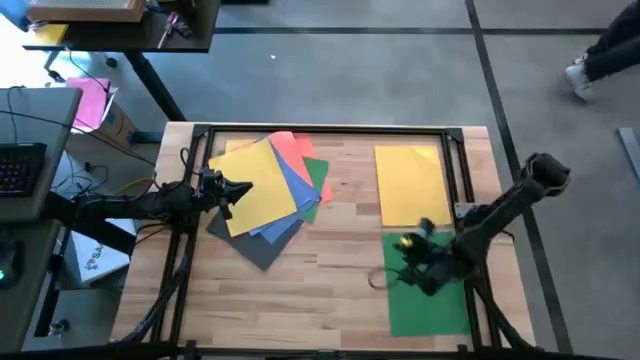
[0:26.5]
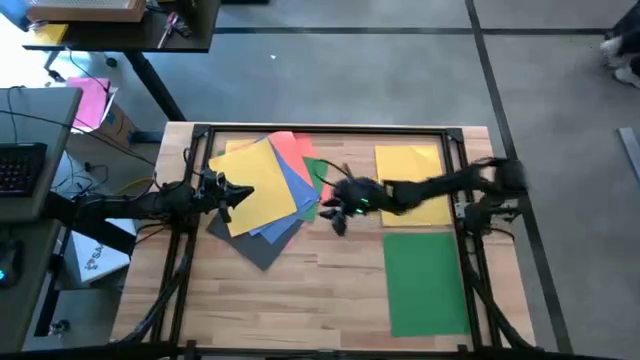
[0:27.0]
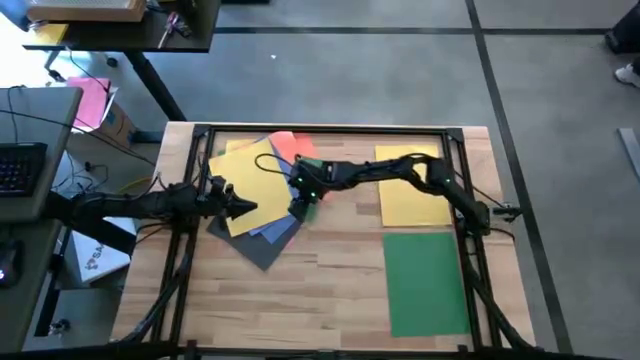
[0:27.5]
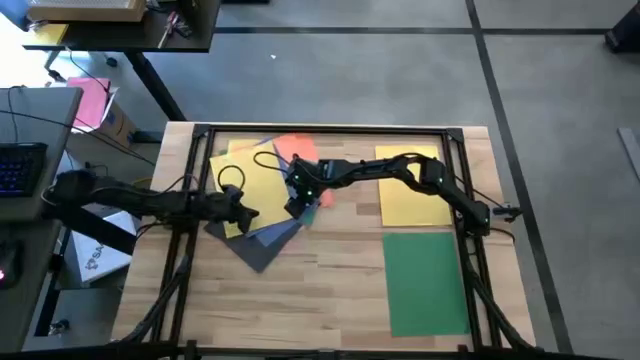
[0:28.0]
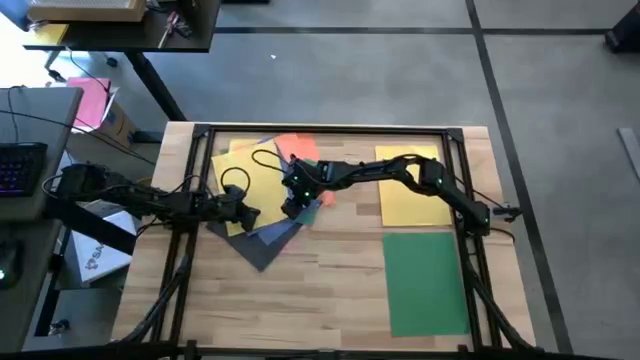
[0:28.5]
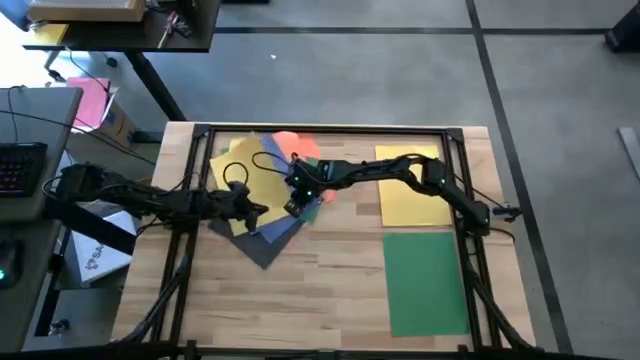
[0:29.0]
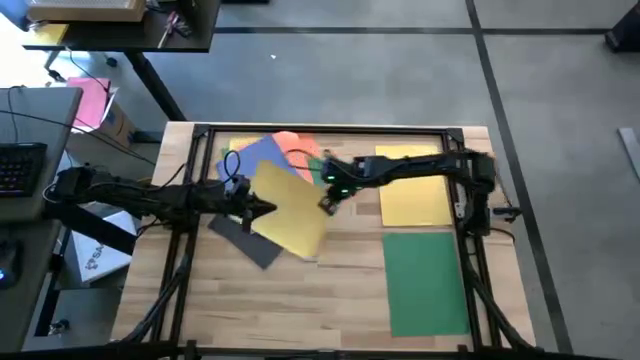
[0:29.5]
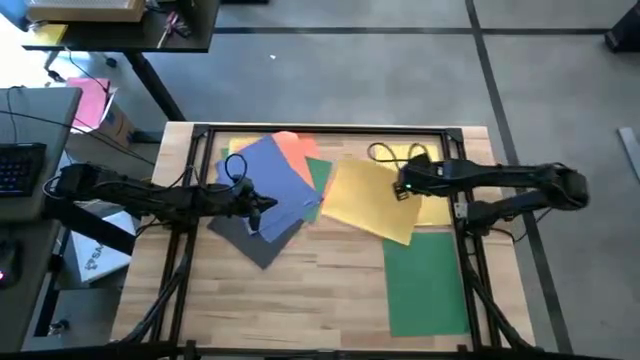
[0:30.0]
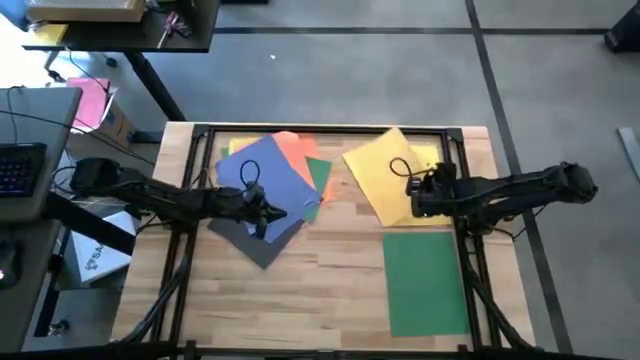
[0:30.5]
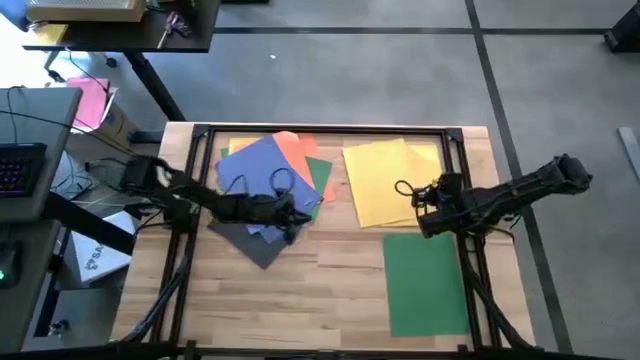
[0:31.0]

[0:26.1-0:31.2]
Task: Organize paper
Stack the yellow paper on top of the yellow paper

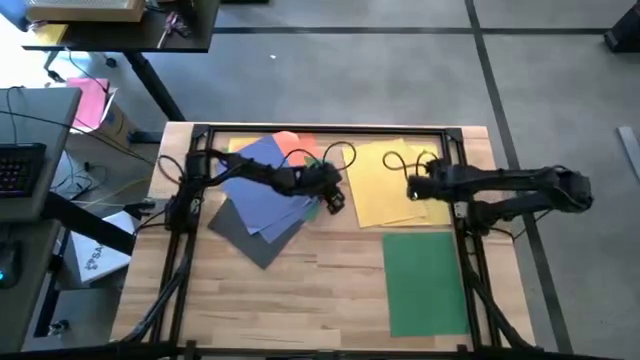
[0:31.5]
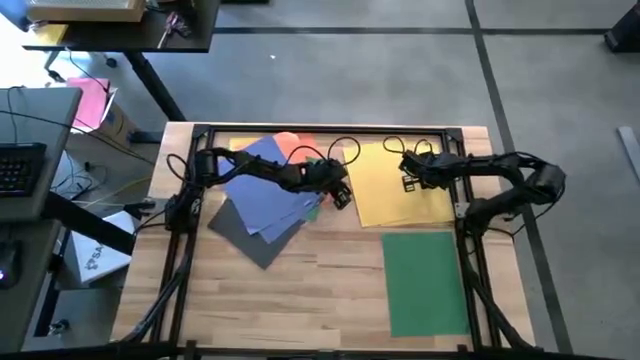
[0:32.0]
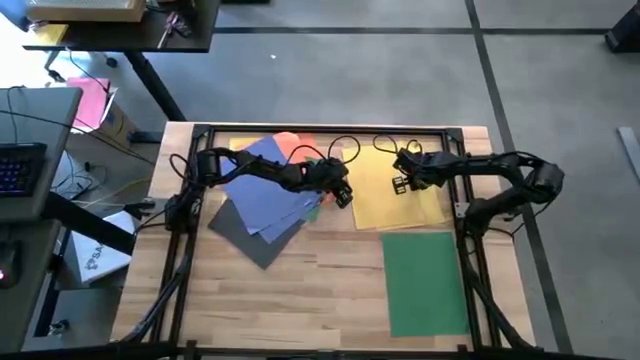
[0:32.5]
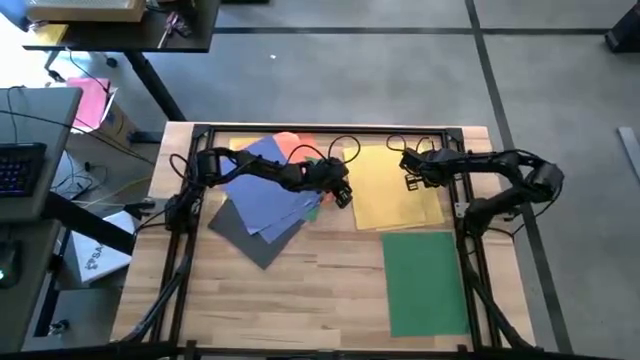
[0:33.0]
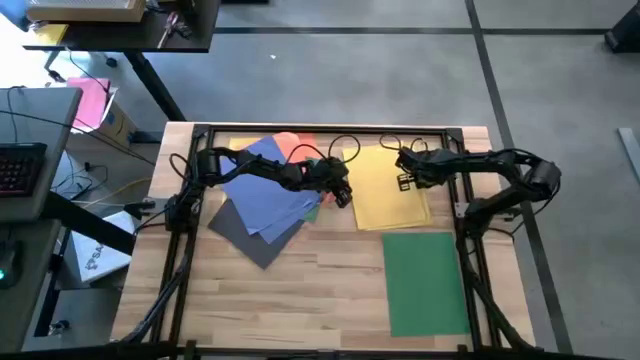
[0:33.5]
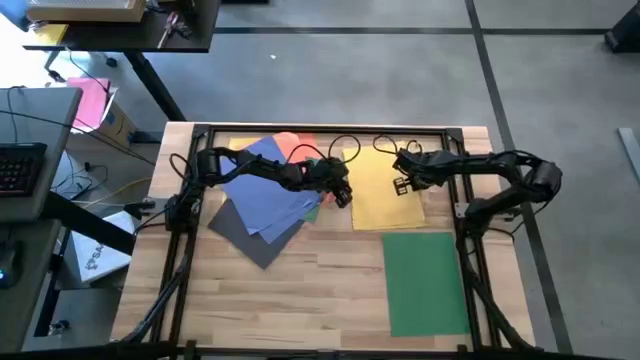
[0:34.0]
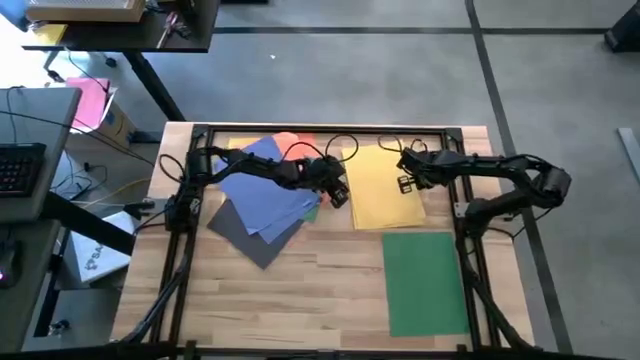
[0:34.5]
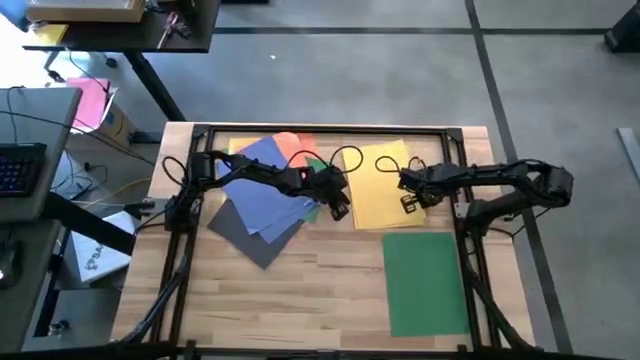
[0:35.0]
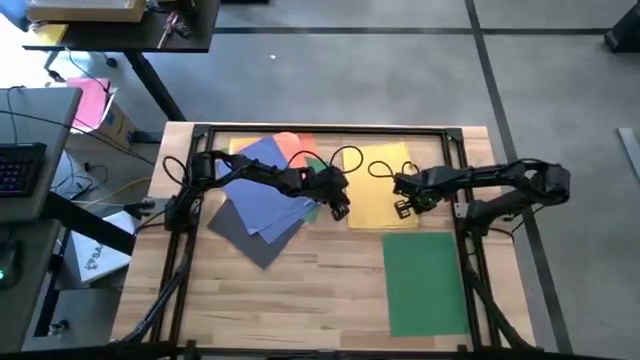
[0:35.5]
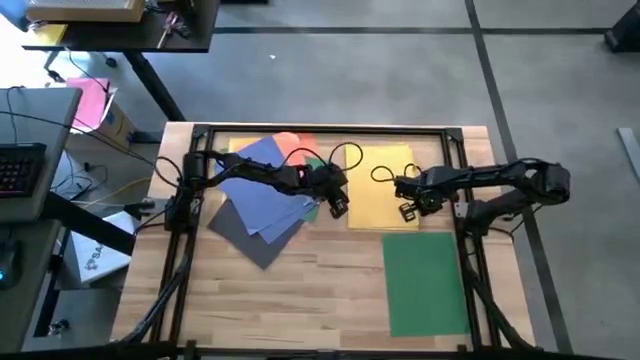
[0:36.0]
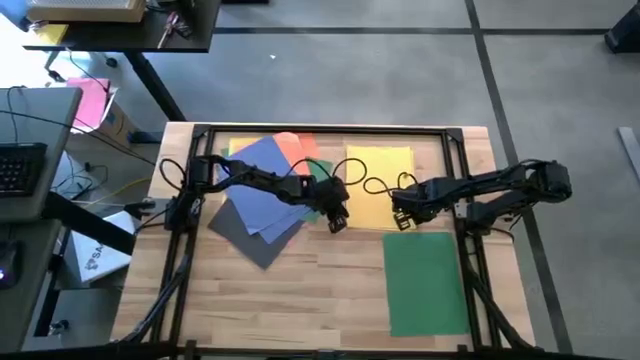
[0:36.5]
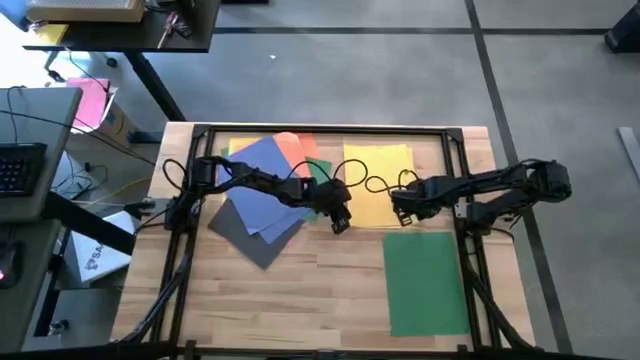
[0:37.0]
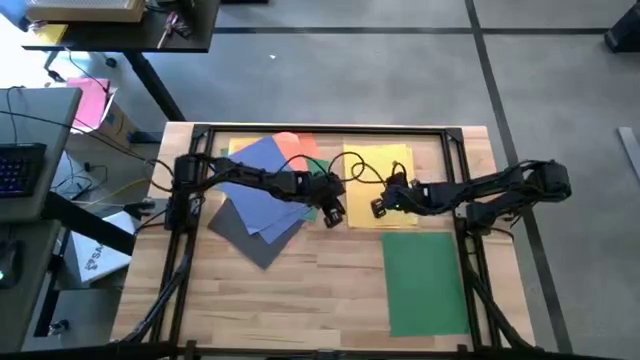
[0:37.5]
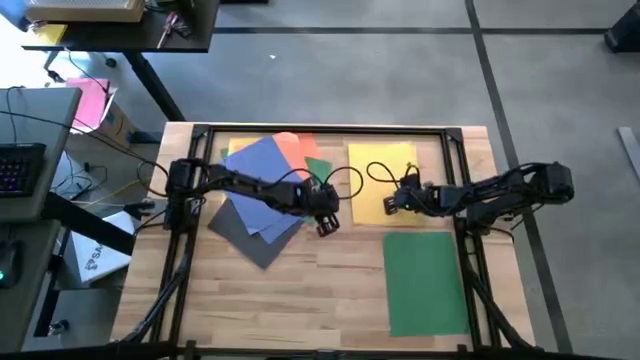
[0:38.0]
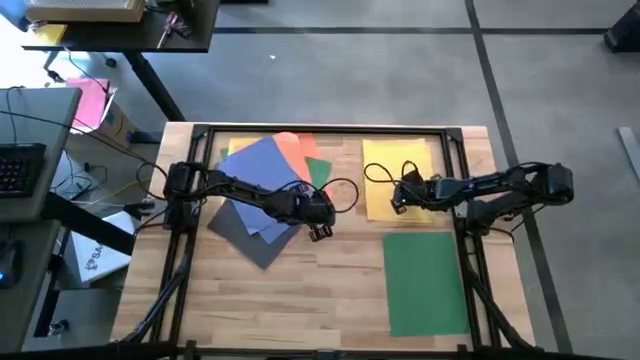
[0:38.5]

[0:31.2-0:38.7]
Adjust the top right yellow paper

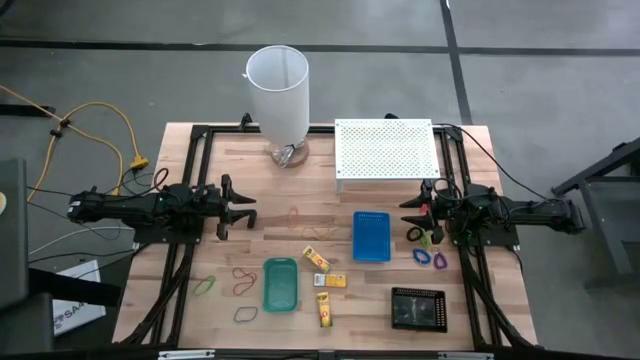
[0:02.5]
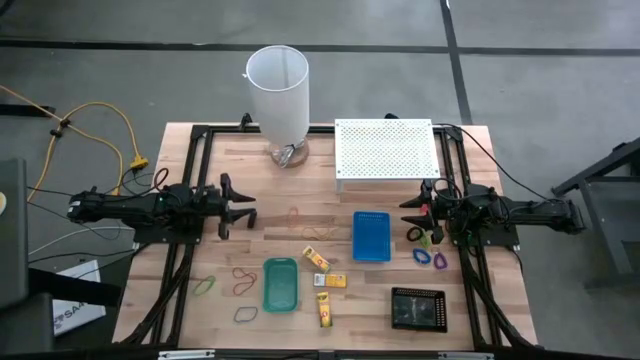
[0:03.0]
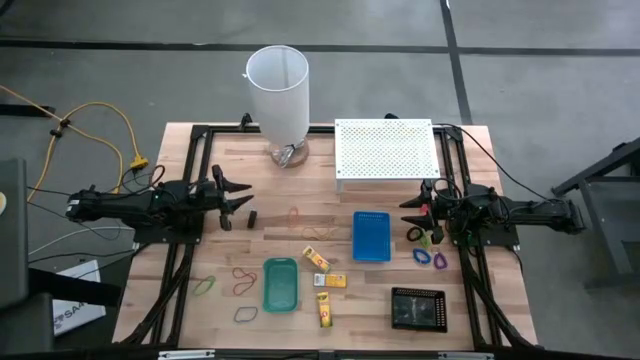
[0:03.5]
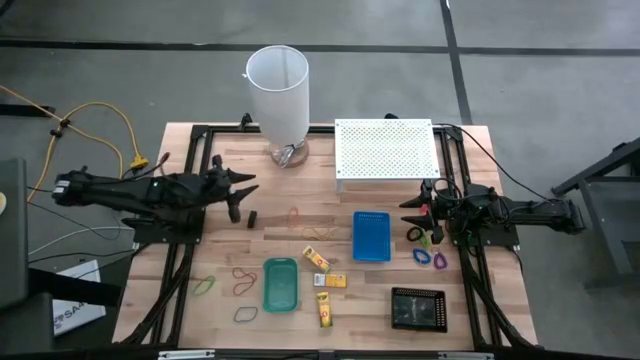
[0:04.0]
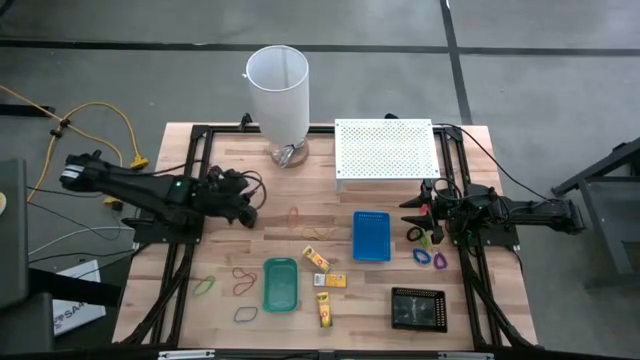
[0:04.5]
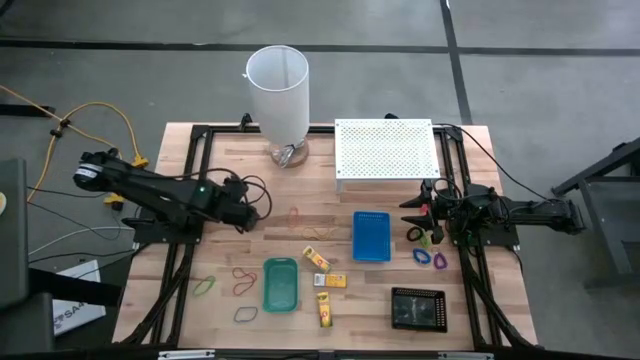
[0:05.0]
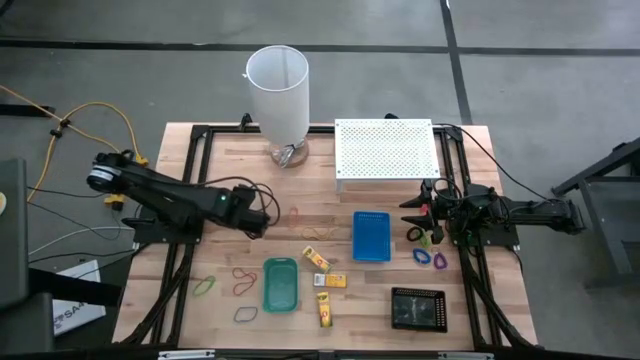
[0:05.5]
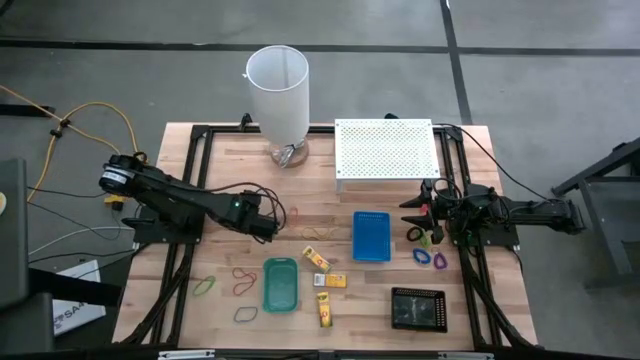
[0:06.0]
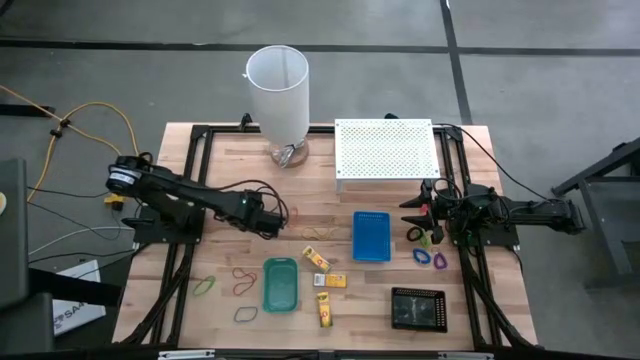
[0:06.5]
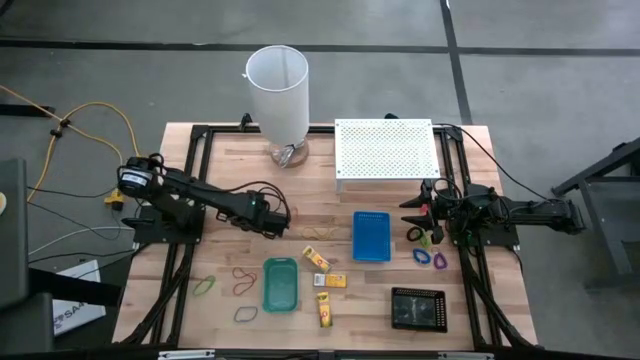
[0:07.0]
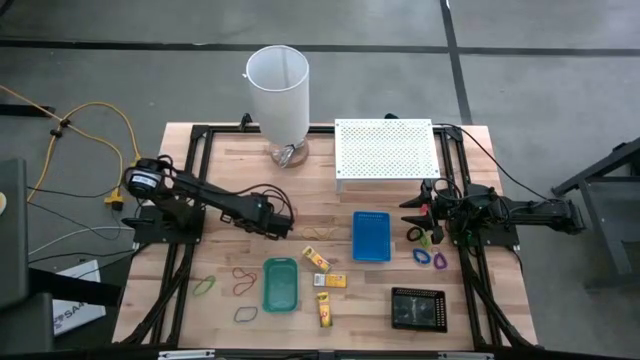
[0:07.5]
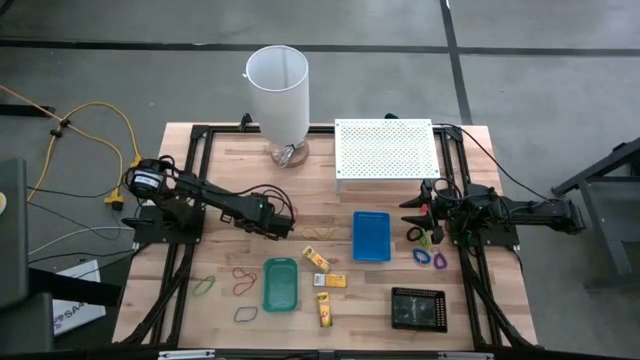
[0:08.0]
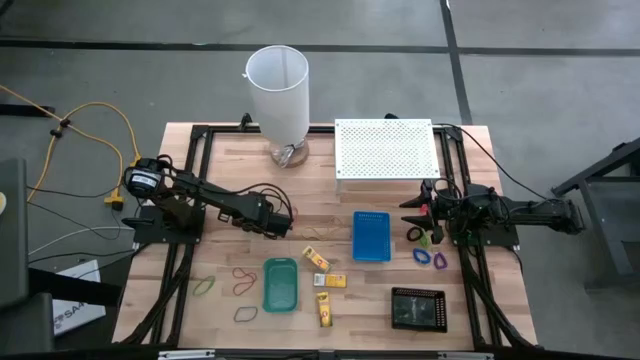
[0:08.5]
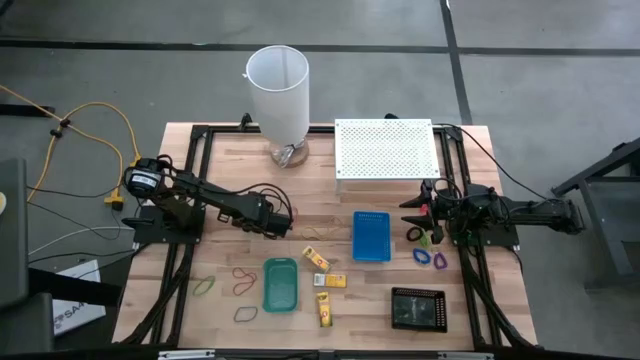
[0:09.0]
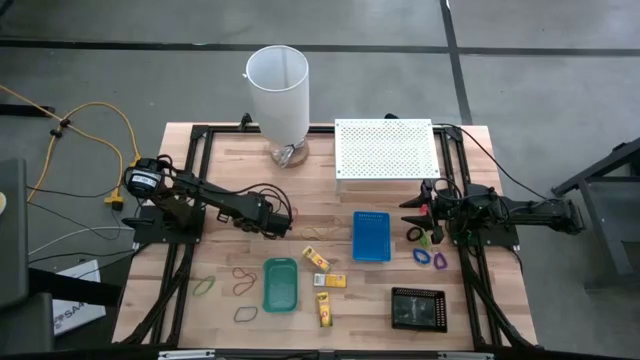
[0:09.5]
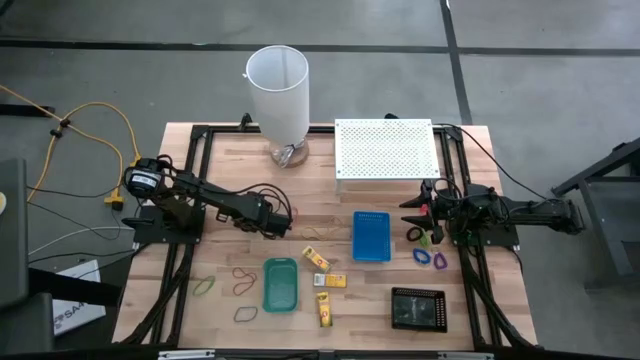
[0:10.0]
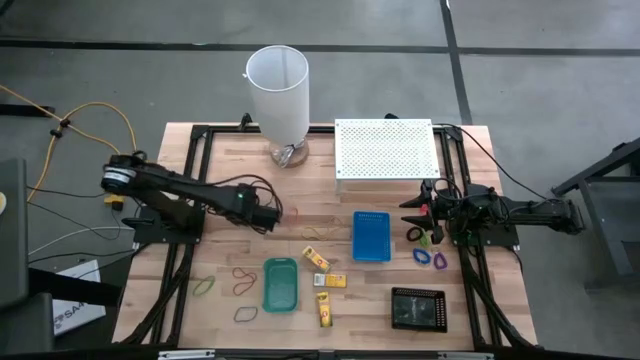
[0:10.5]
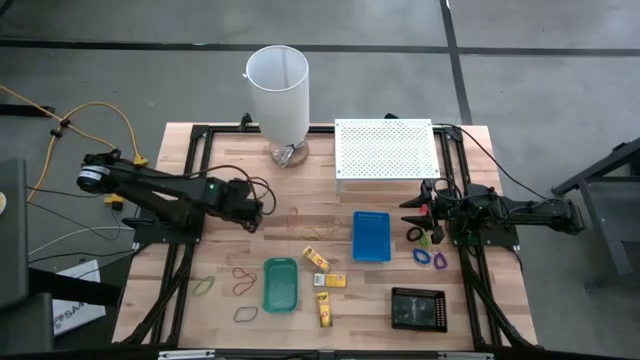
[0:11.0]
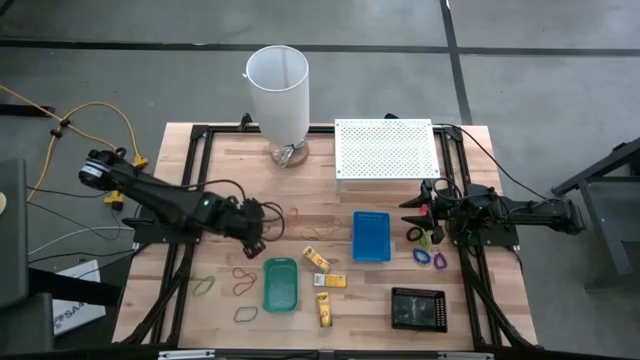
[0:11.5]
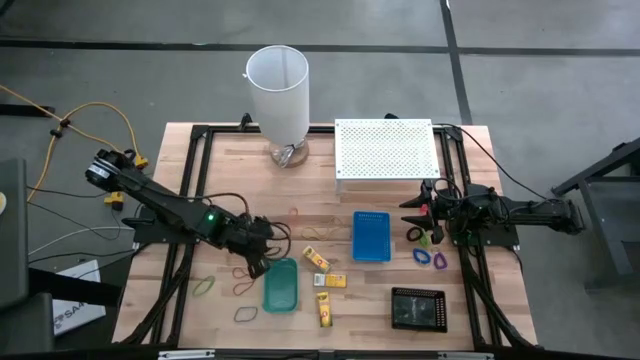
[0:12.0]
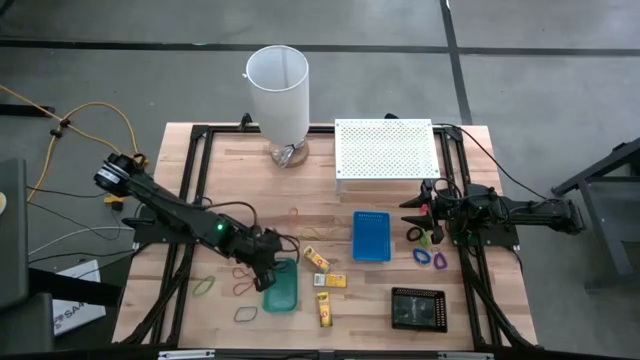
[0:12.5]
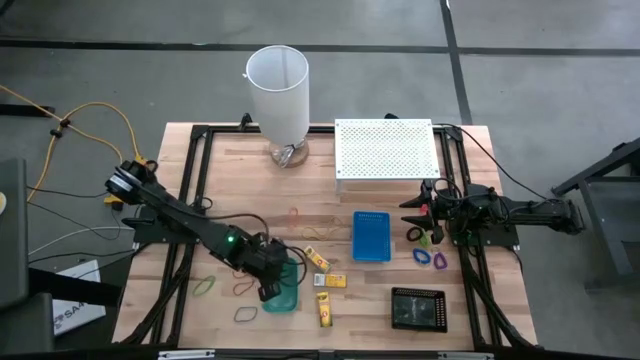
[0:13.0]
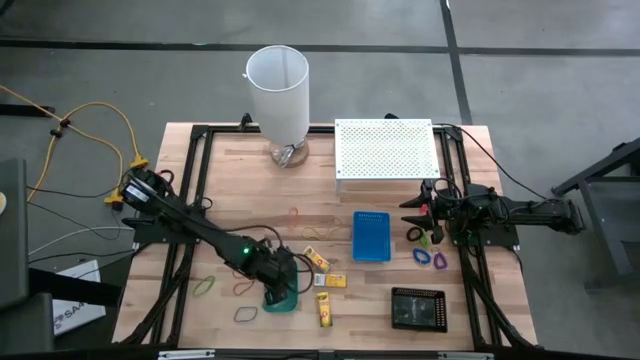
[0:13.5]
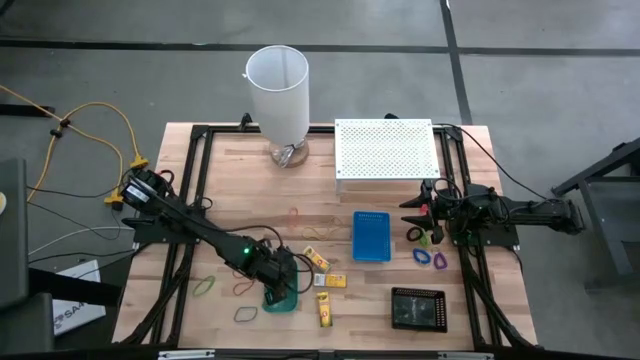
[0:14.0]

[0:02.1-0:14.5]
Task: Pick & Place Office Desk Supplies
Put the black rubber band into the green bin
